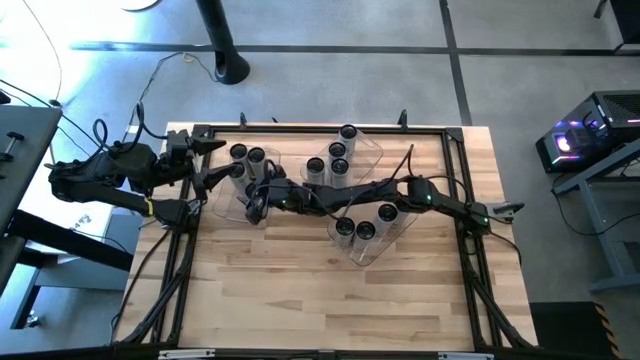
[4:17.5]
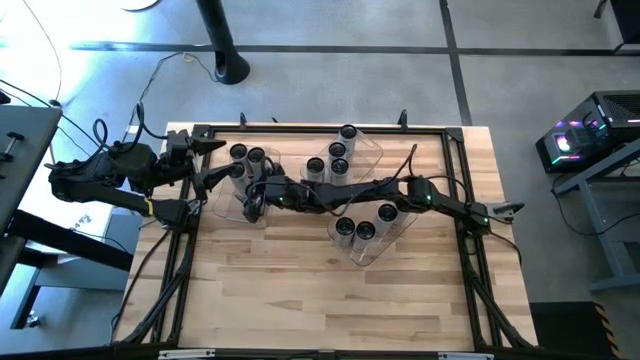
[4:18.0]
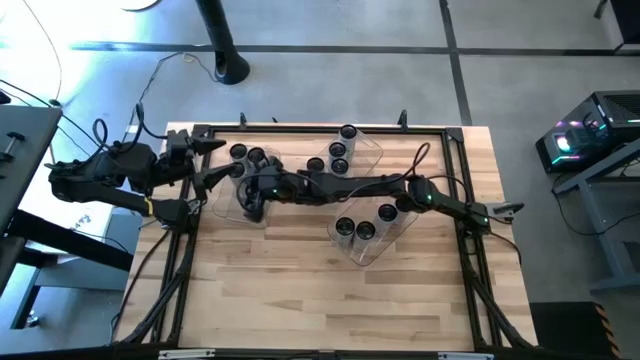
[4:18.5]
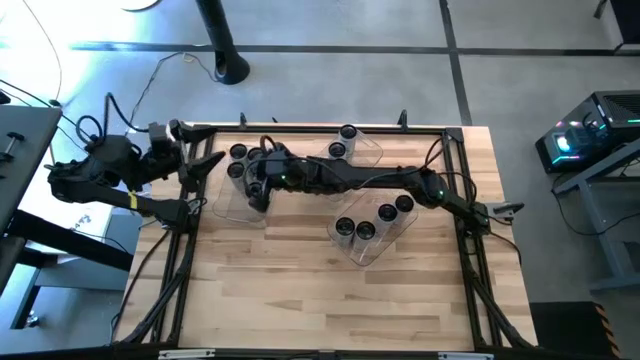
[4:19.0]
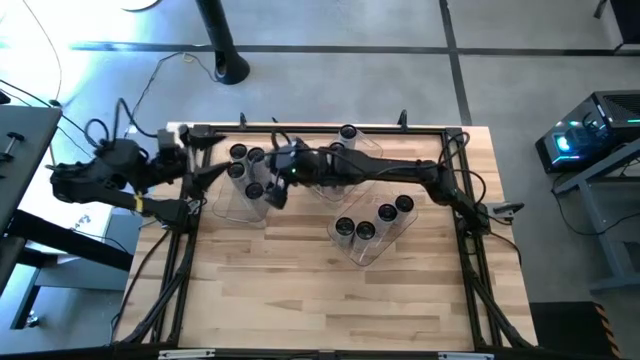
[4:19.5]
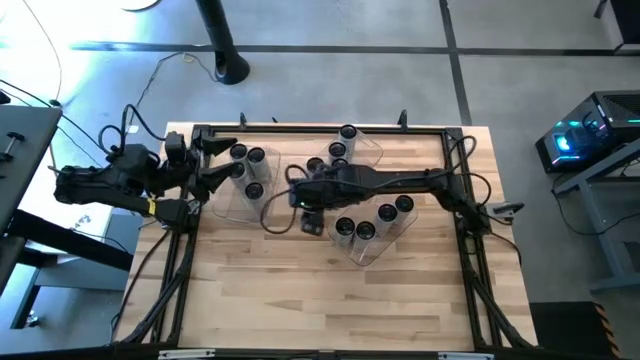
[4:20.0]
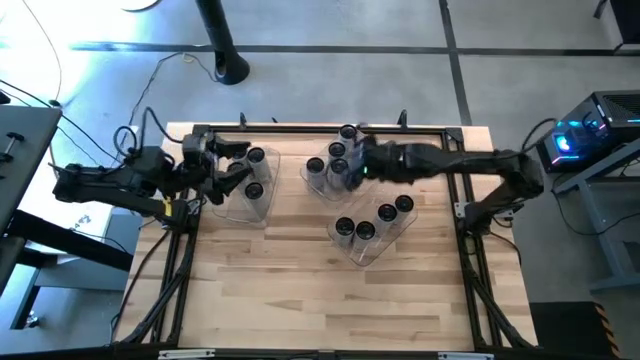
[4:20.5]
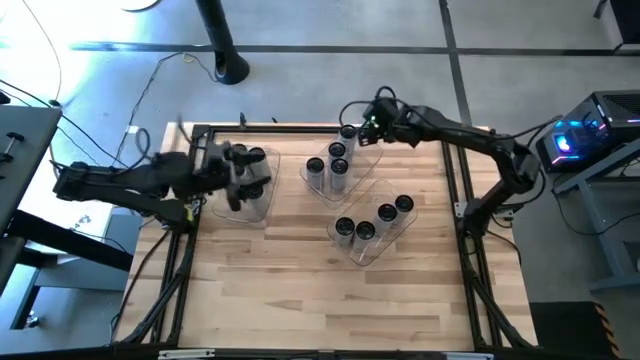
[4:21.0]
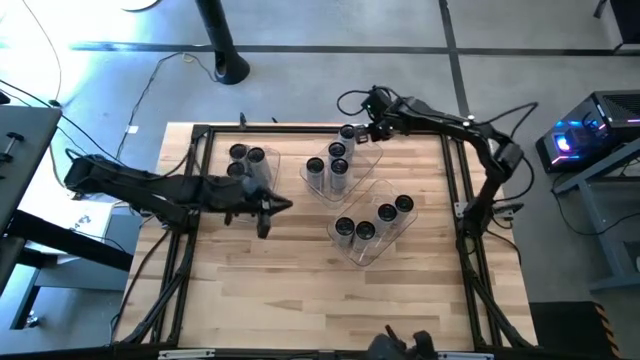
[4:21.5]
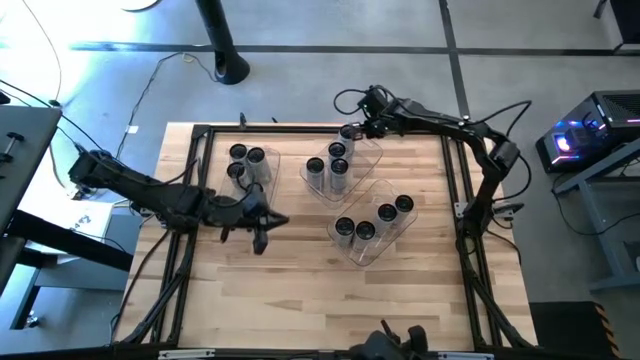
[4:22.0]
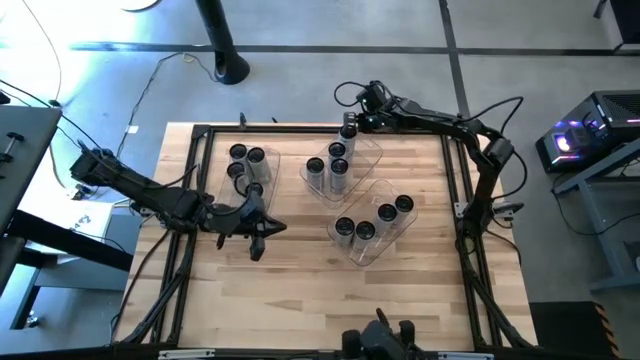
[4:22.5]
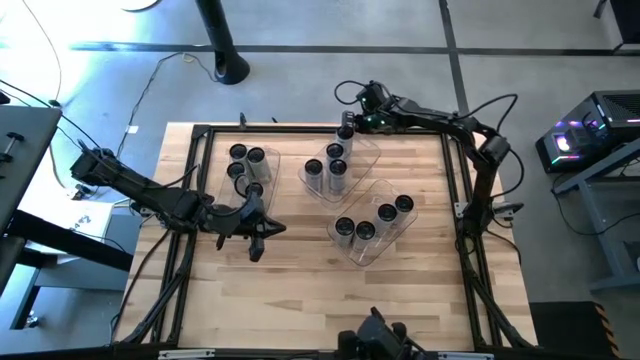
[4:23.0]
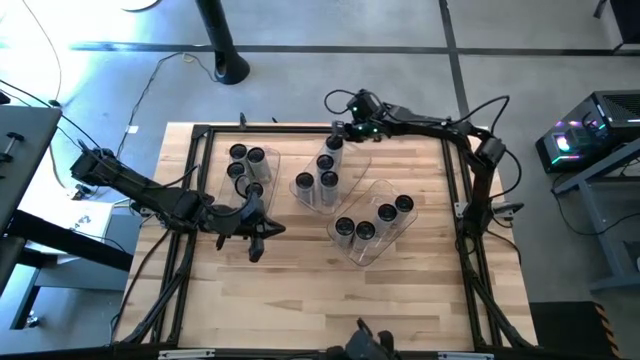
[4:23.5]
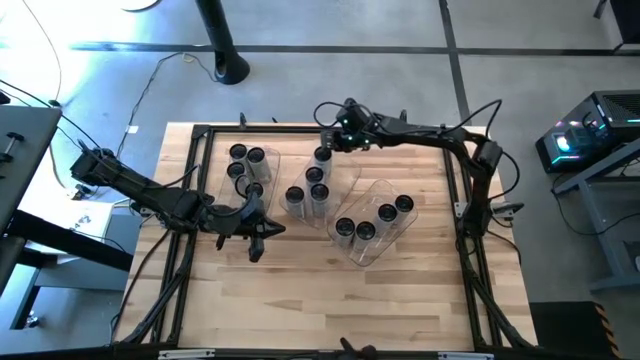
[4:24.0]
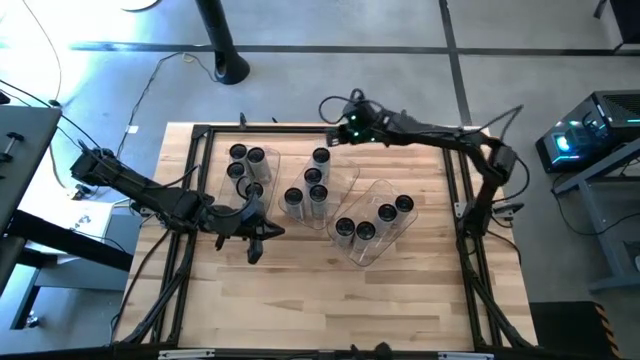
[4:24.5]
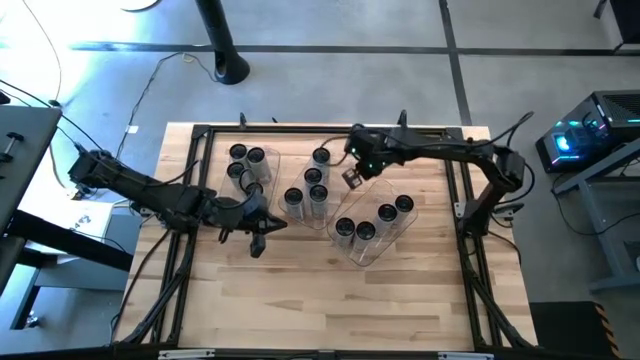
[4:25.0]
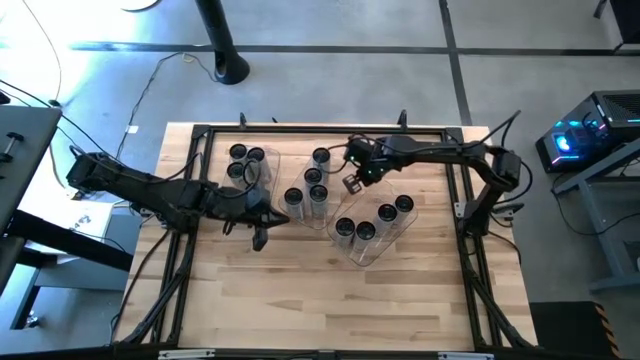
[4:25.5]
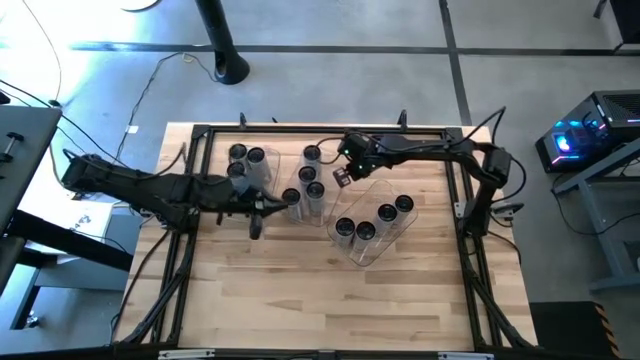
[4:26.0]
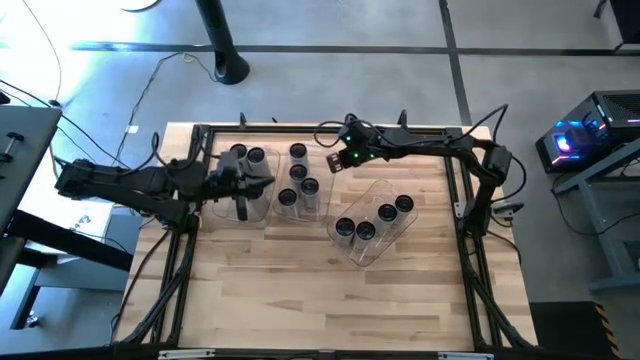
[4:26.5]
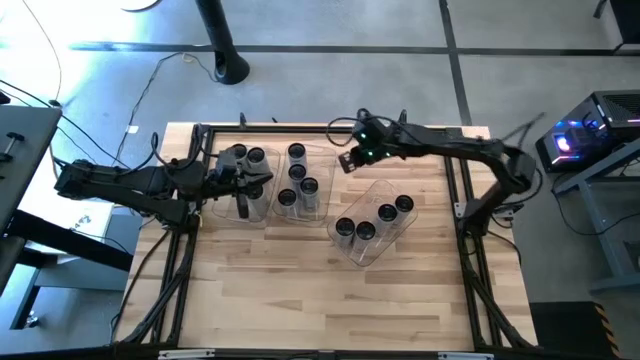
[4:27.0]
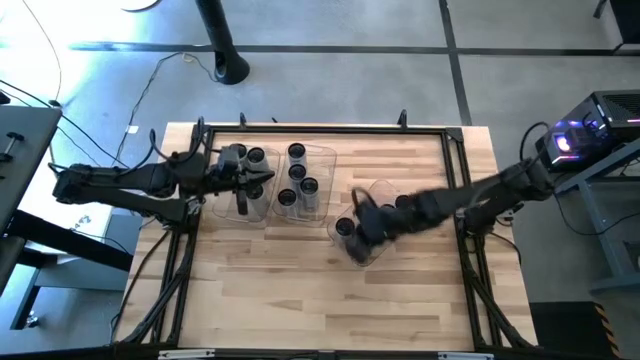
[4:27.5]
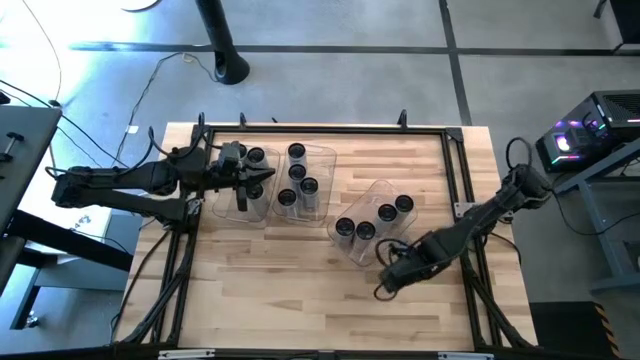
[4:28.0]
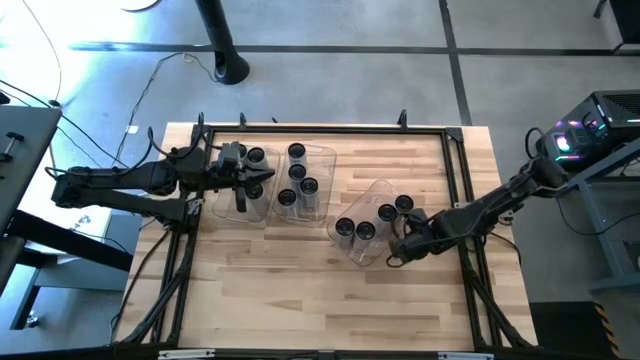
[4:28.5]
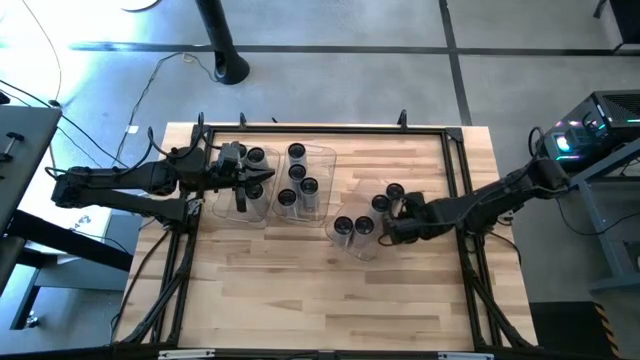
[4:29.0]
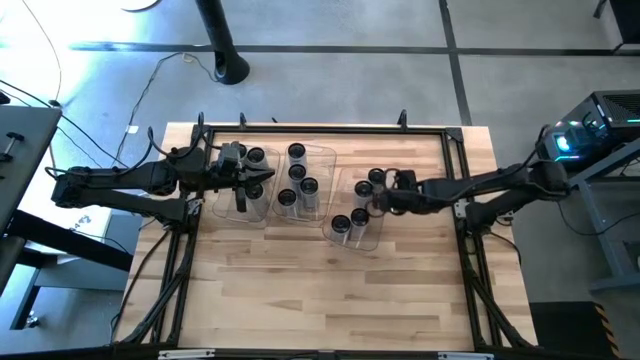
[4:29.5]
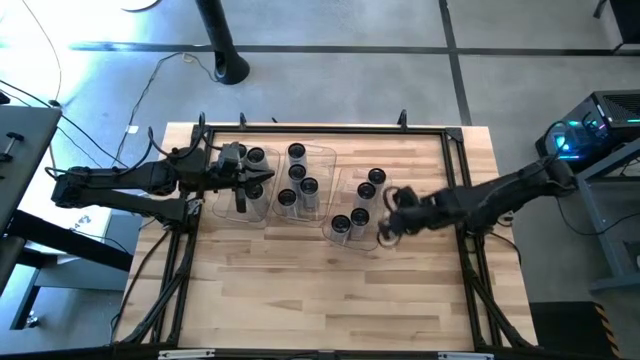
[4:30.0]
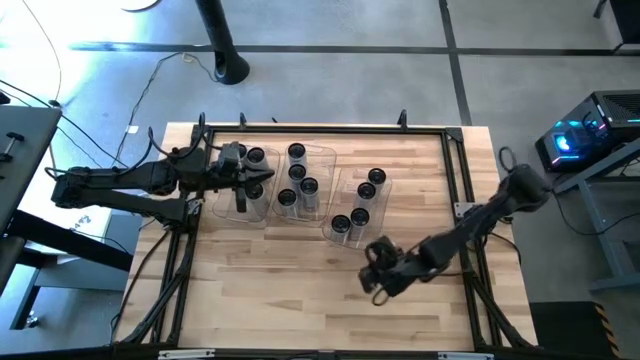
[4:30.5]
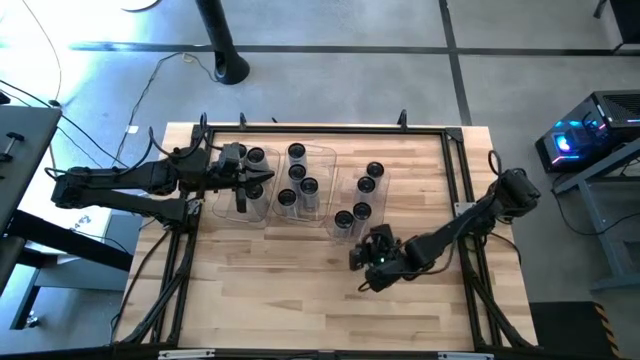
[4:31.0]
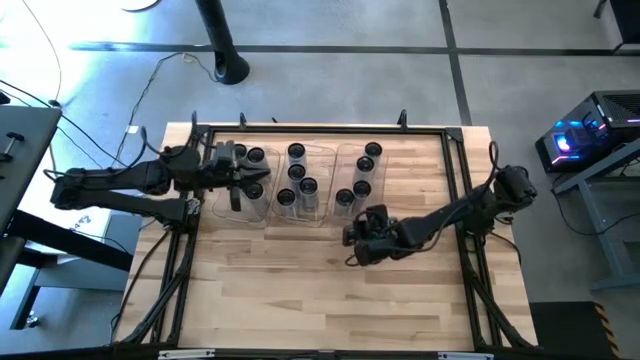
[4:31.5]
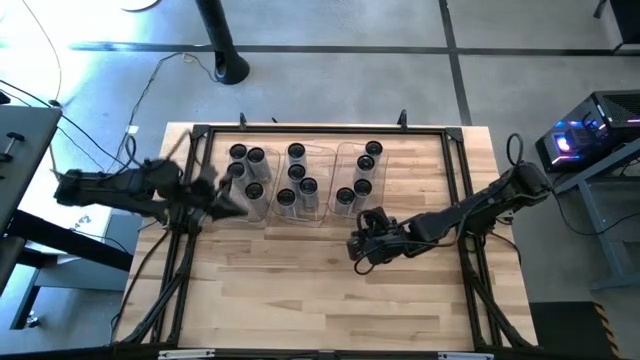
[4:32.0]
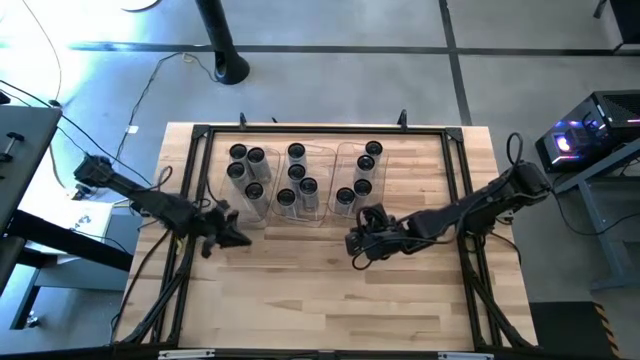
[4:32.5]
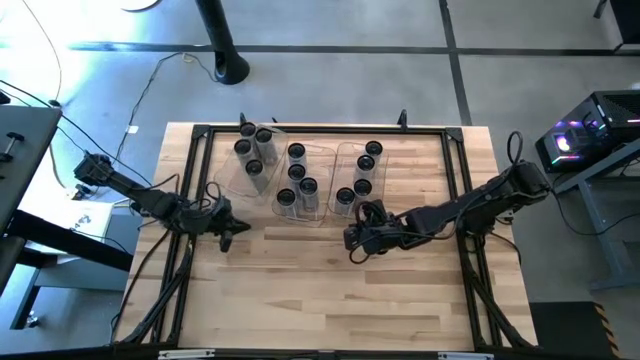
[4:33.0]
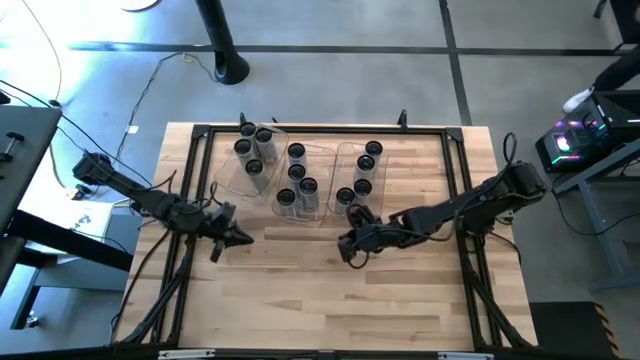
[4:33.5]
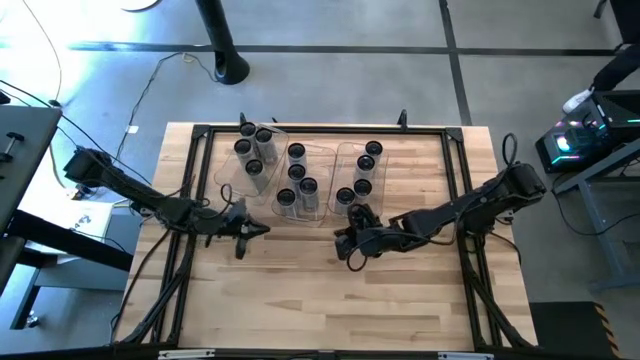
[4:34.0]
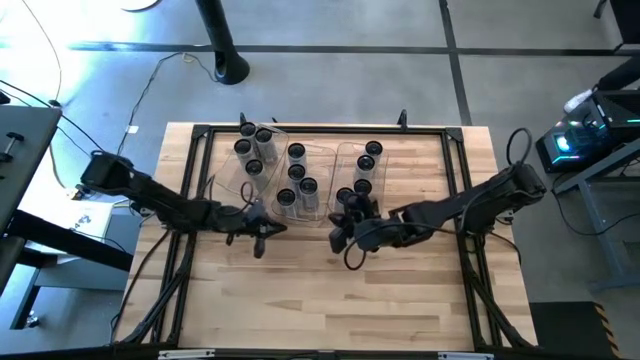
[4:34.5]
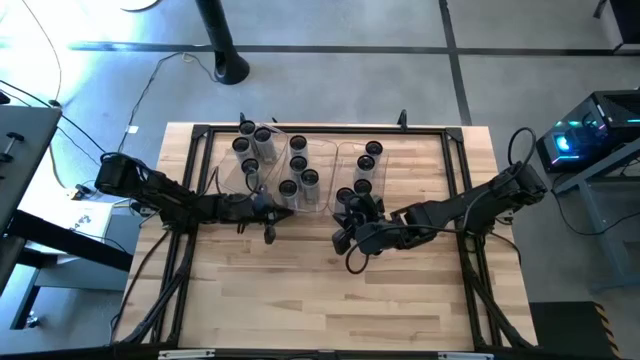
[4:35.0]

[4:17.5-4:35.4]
Task: Sort soda cans
Adjust all the transparent bins

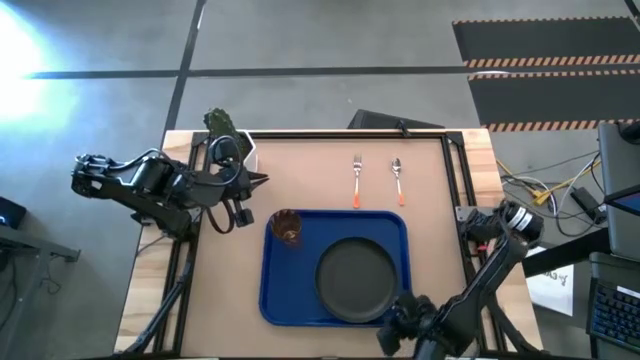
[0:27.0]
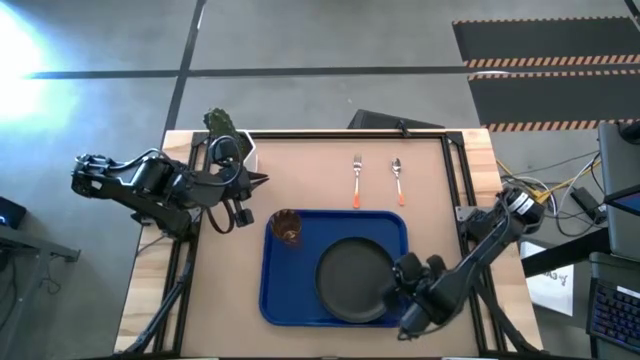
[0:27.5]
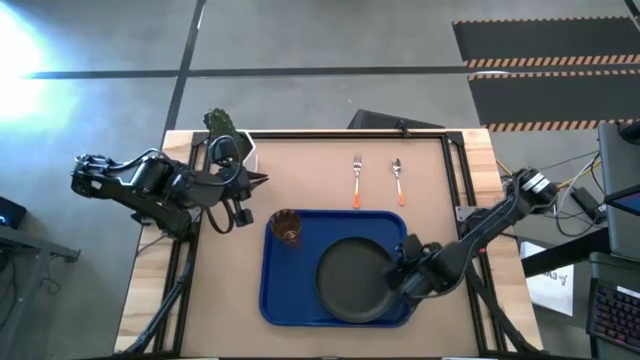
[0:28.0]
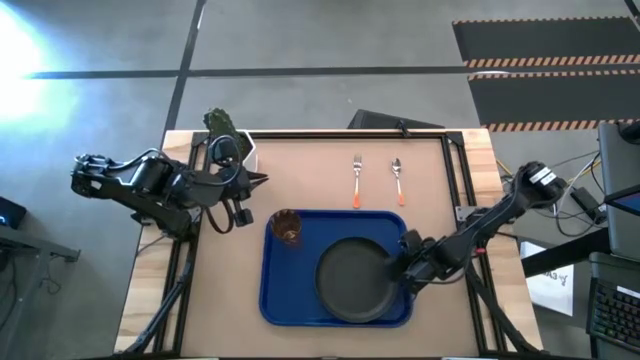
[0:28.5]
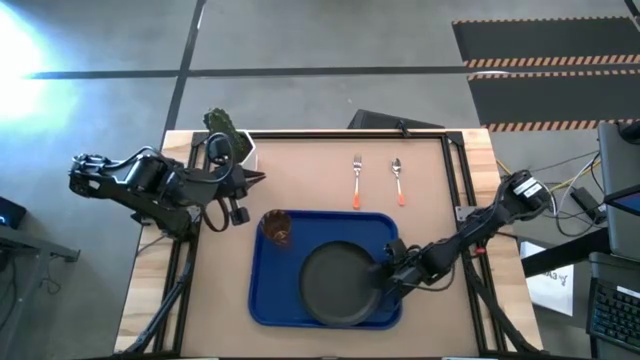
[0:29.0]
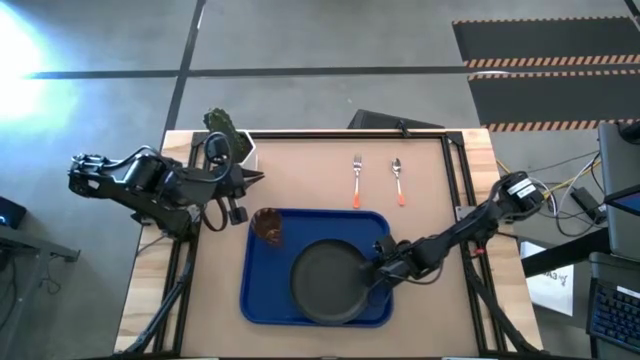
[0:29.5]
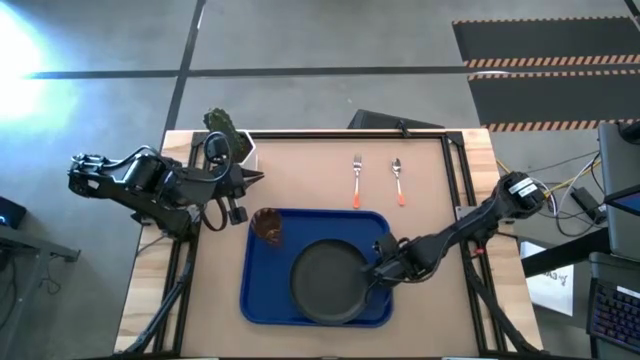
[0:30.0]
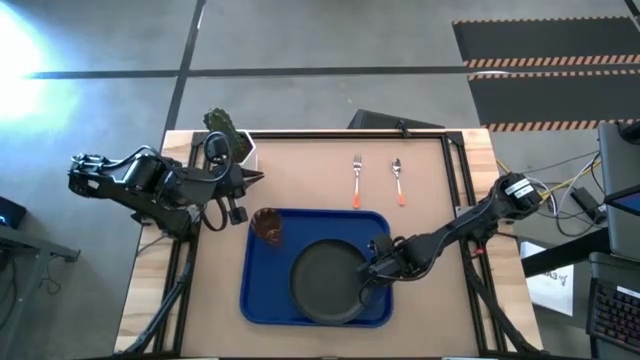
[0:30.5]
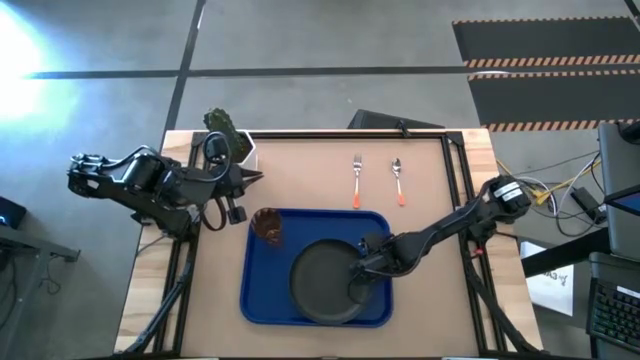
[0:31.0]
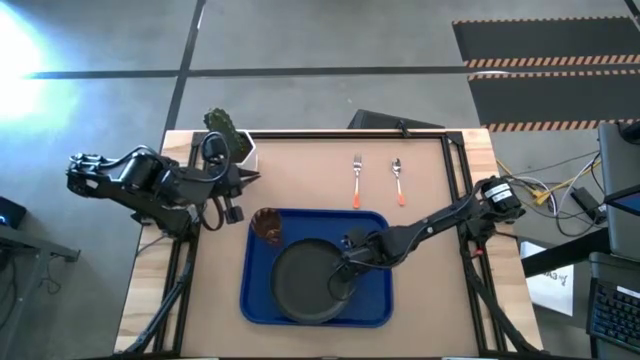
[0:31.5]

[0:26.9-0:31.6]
Task: Pick and place plate/cup/fork/spoon on tray
Adjust the black plate
